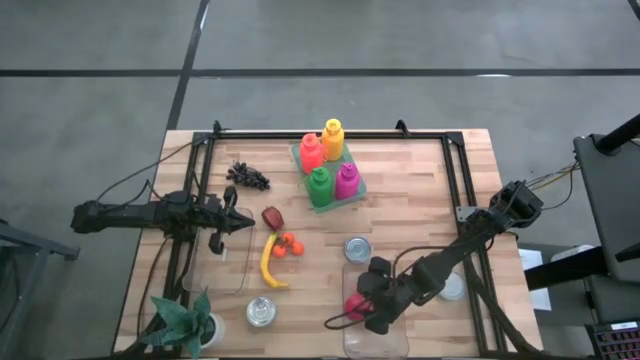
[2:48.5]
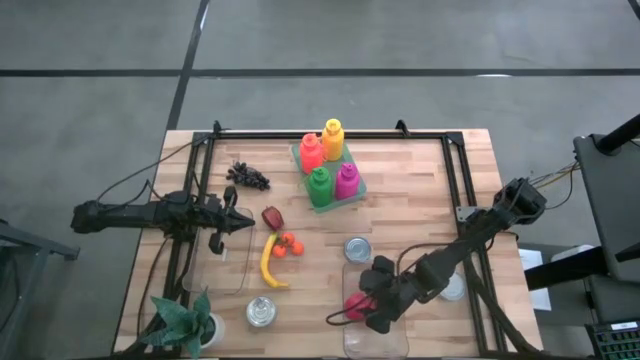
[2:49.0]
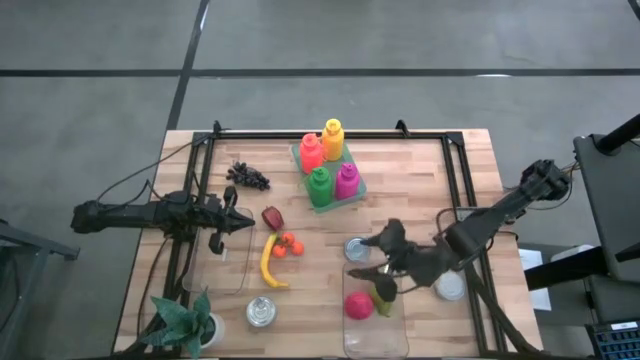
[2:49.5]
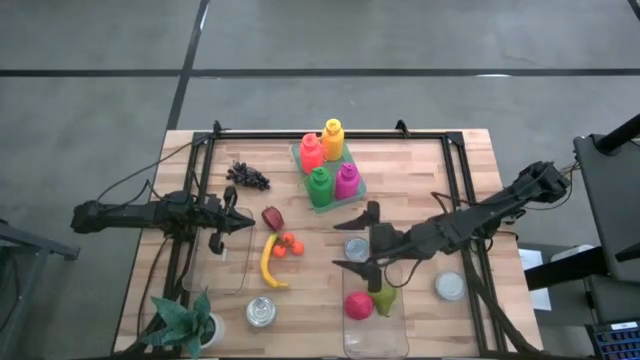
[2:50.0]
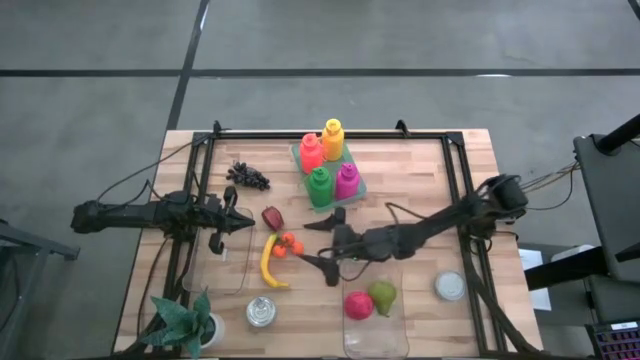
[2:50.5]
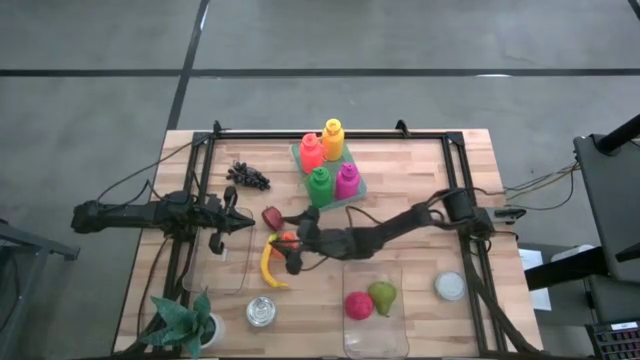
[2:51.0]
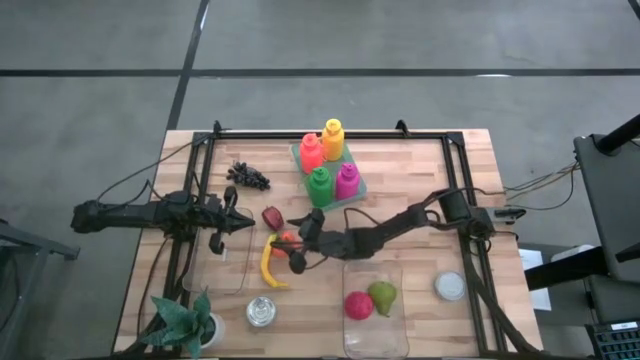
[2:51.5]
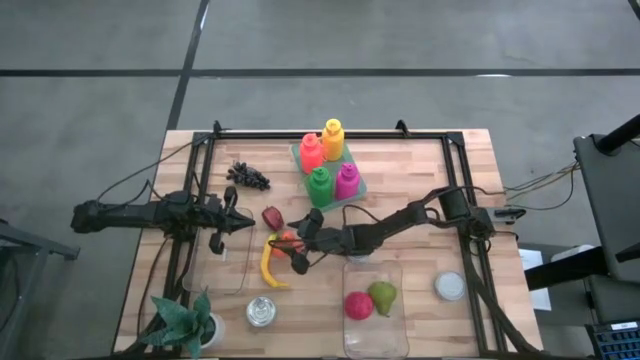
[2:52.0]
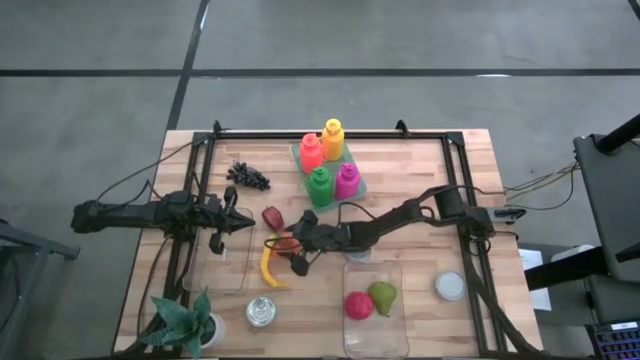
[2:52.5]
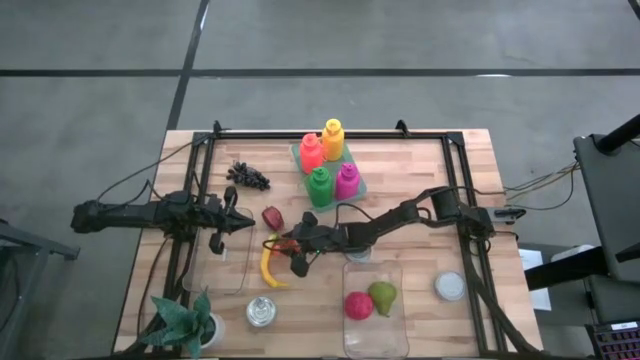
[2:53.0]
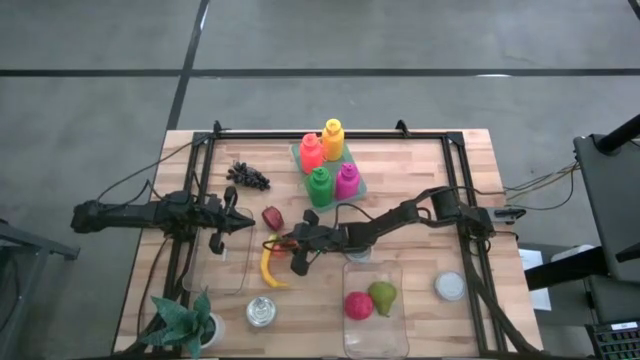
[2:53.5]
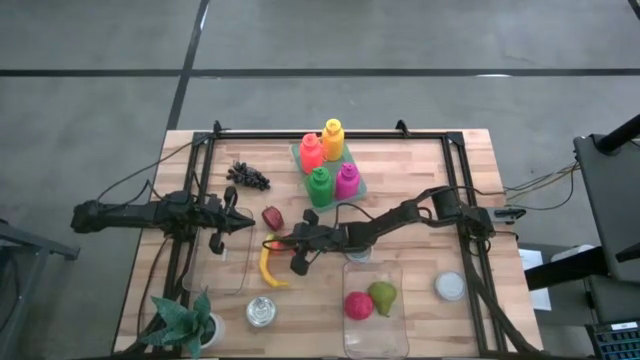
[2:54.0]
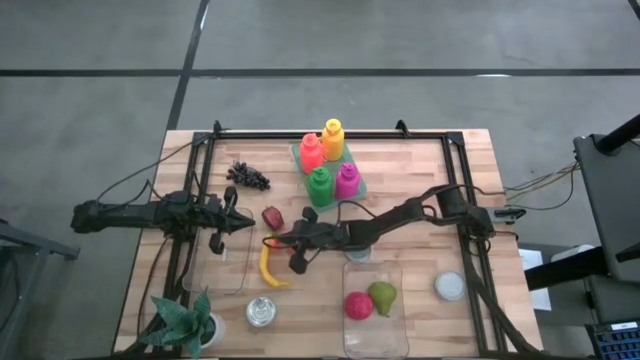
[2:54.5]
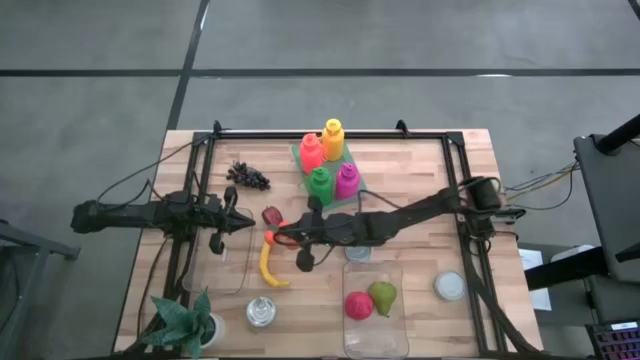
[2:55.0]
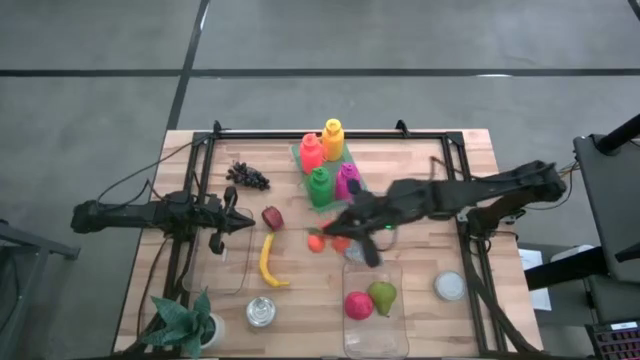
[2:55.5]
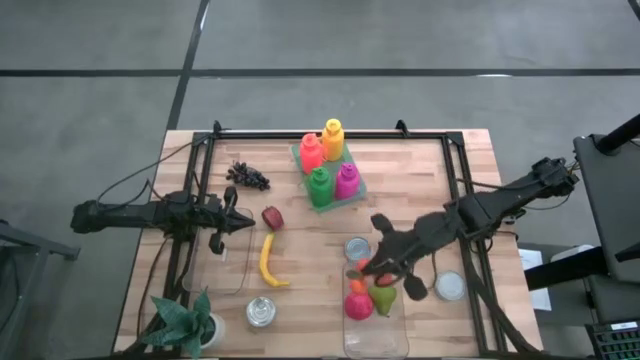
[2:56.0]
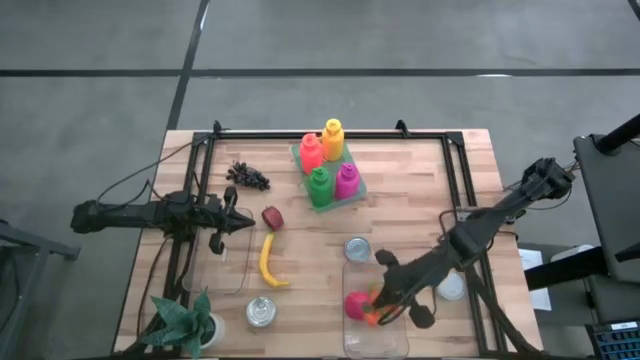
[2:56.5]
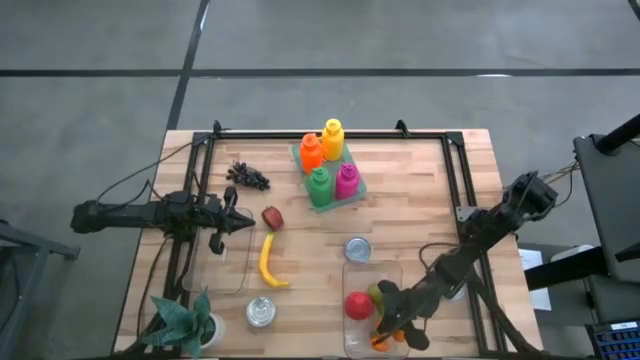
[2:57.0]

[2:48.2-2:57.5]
Task: Pick & Place Food Item
Put the tangerines into the bottom transparent bin

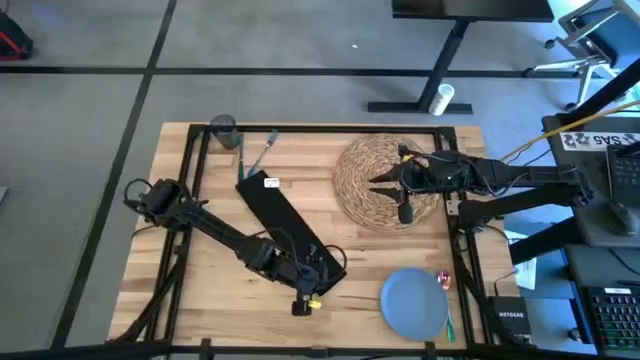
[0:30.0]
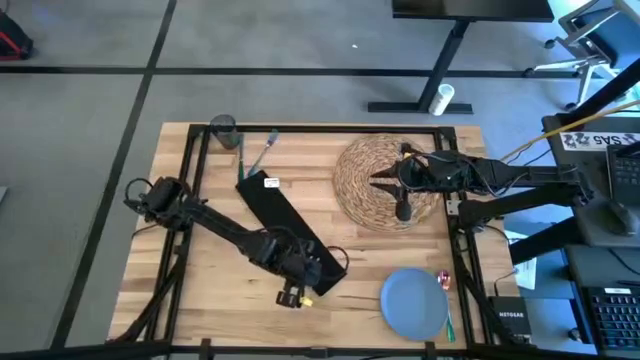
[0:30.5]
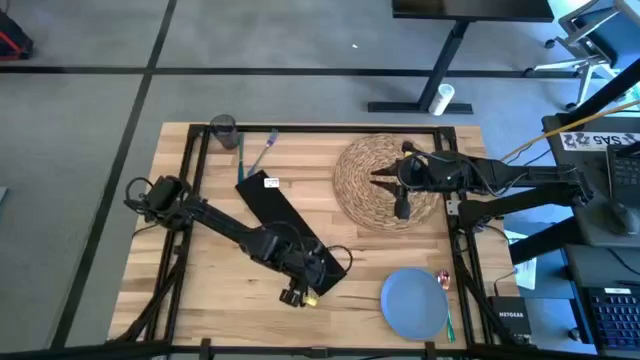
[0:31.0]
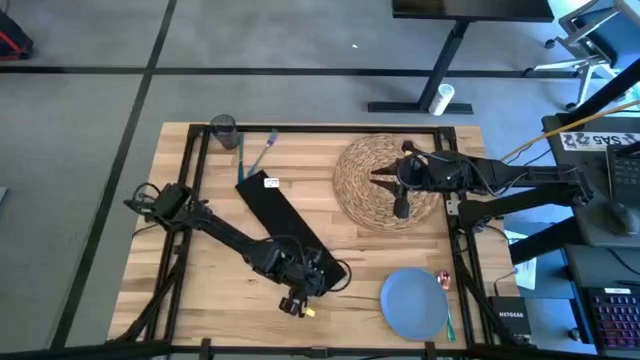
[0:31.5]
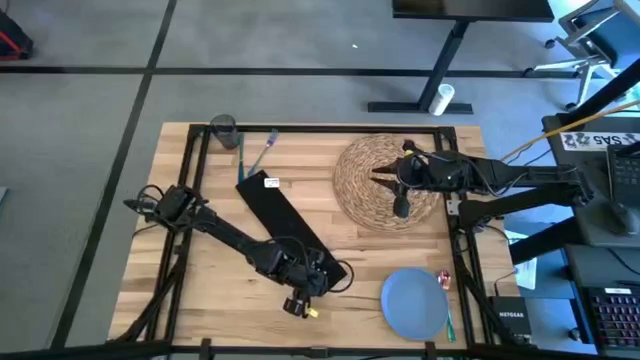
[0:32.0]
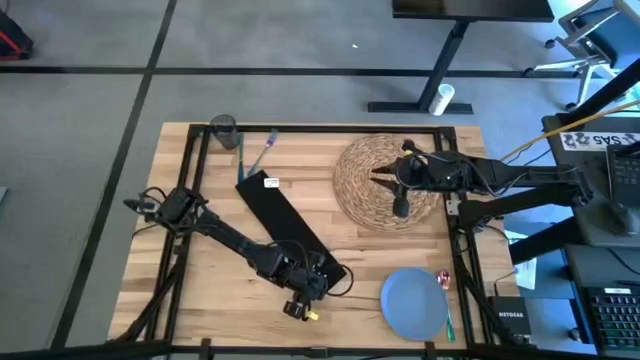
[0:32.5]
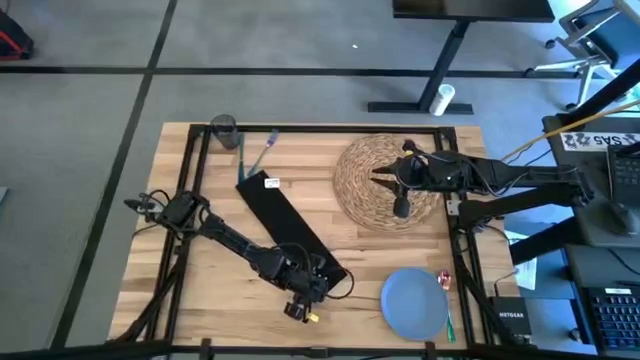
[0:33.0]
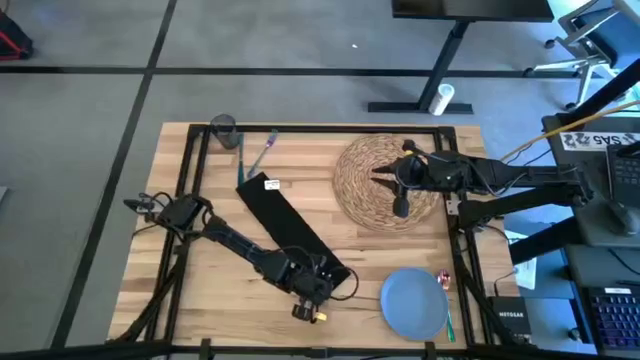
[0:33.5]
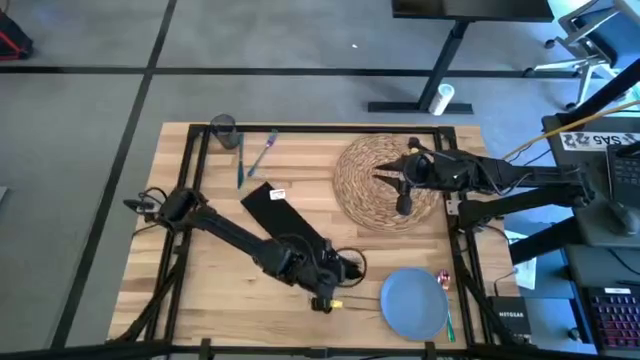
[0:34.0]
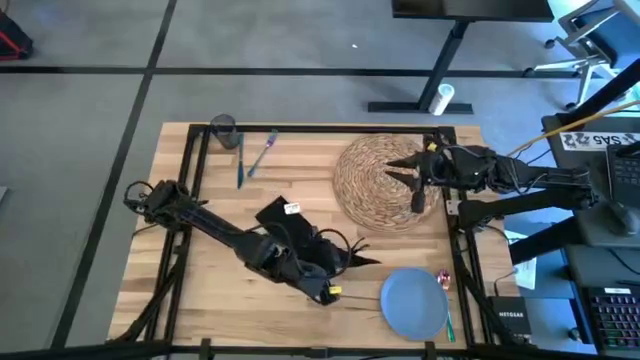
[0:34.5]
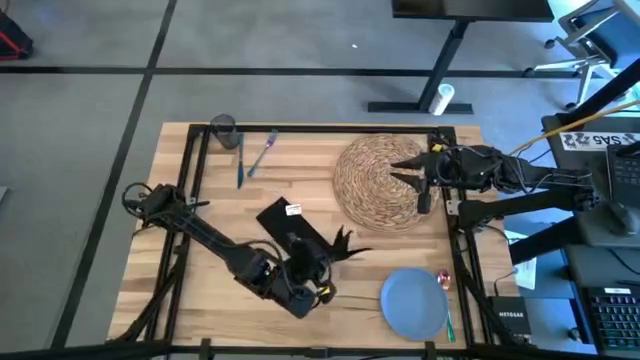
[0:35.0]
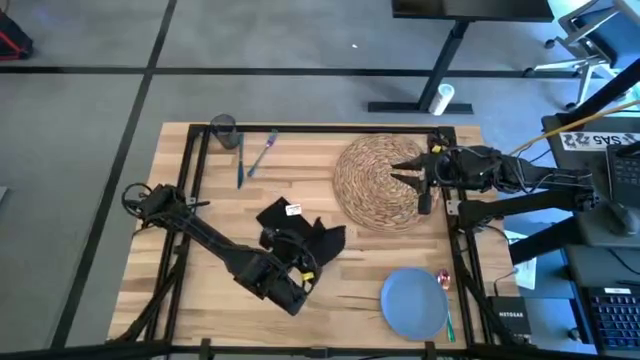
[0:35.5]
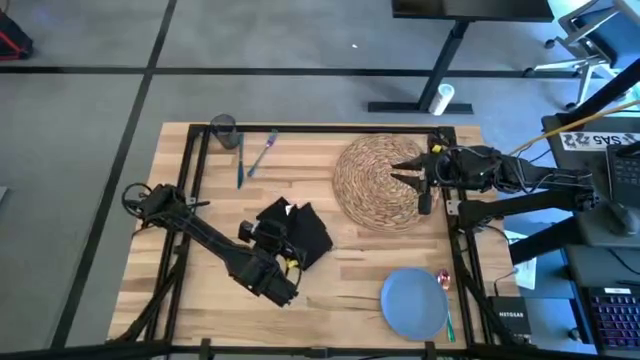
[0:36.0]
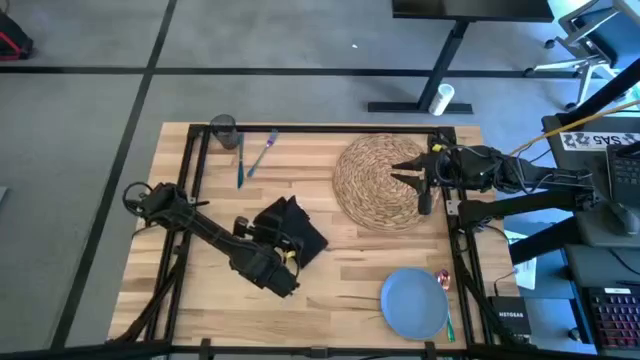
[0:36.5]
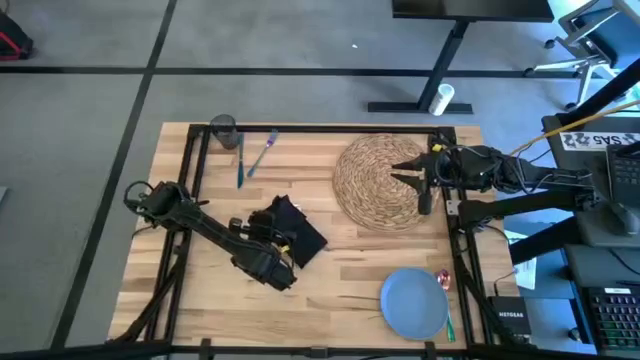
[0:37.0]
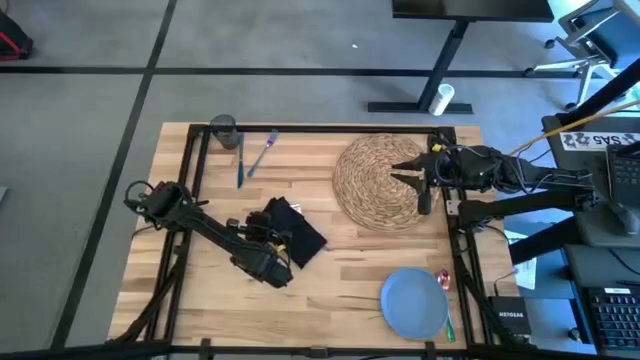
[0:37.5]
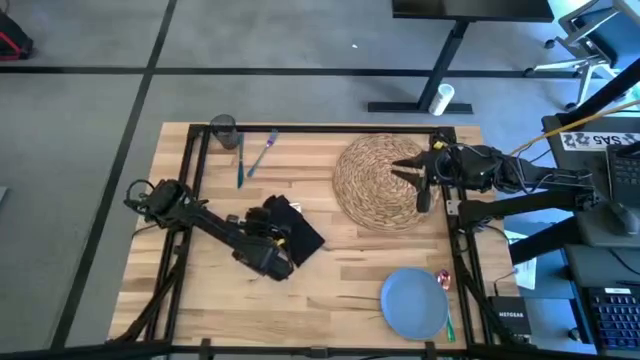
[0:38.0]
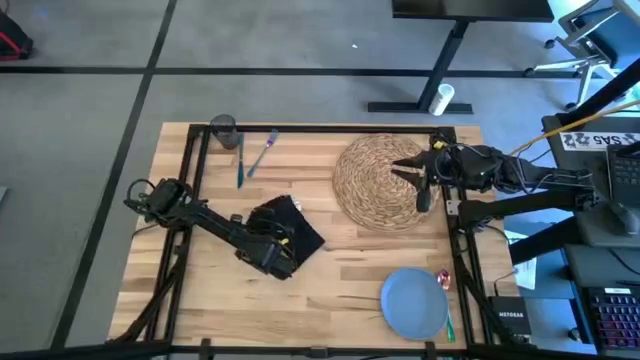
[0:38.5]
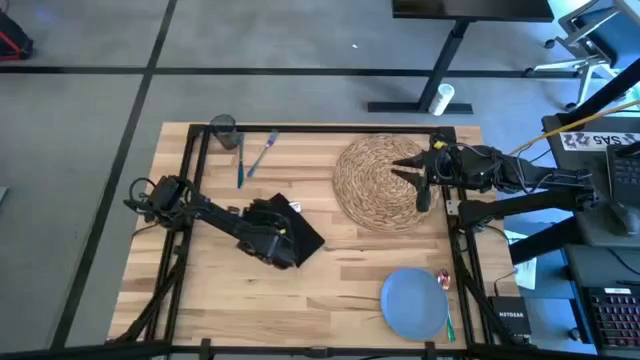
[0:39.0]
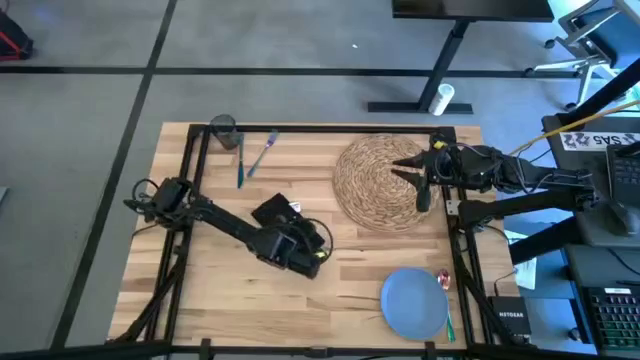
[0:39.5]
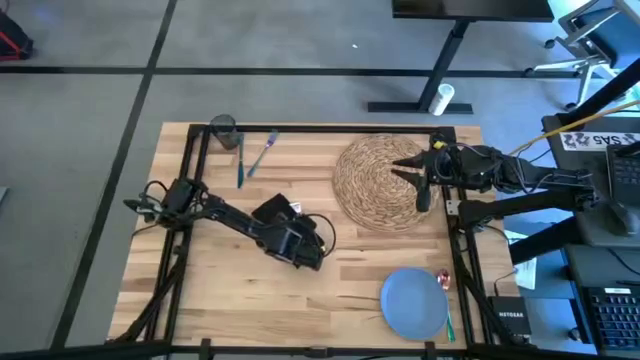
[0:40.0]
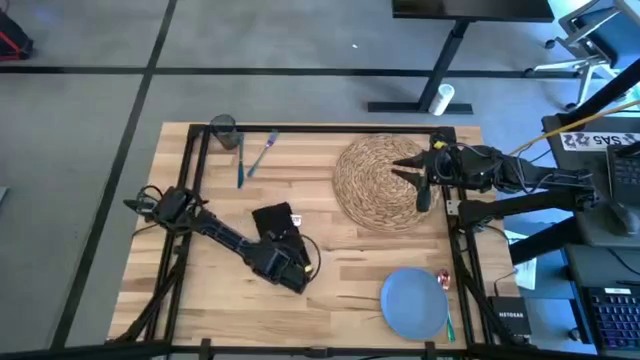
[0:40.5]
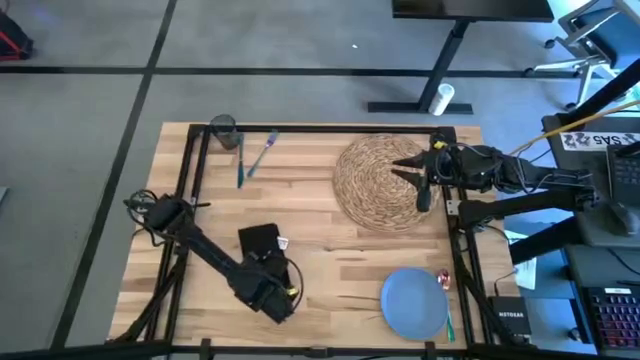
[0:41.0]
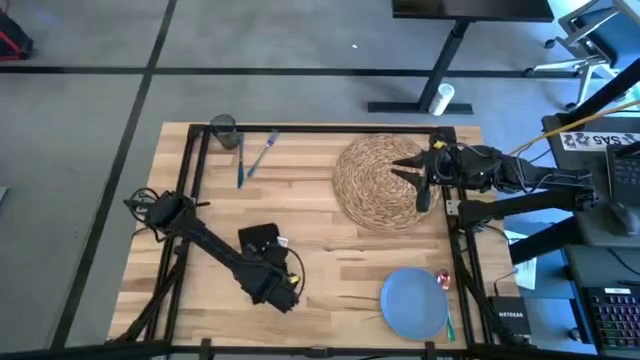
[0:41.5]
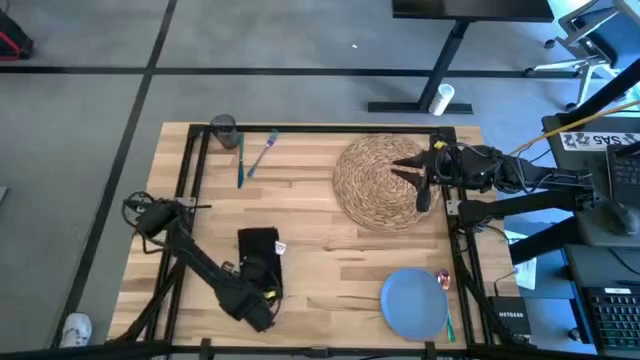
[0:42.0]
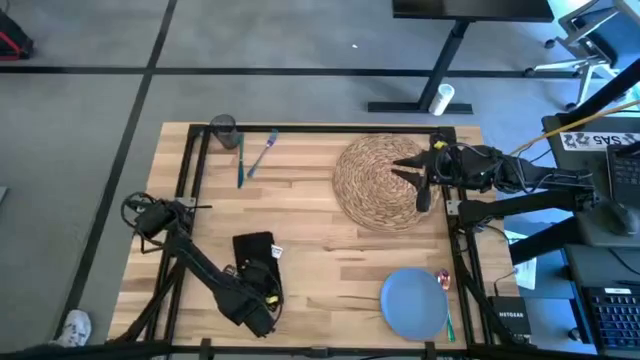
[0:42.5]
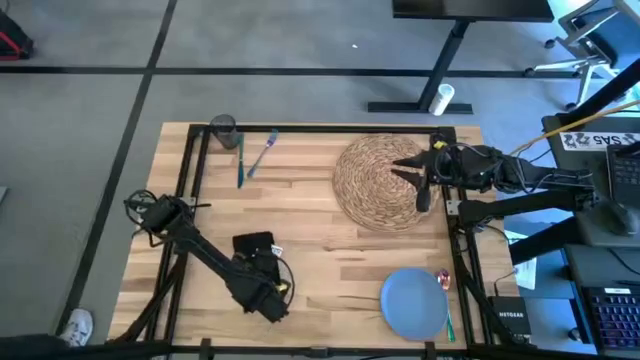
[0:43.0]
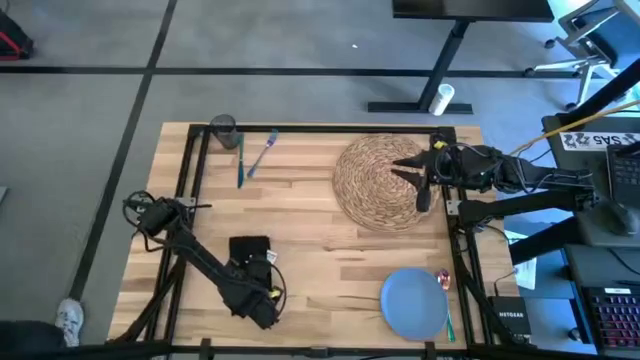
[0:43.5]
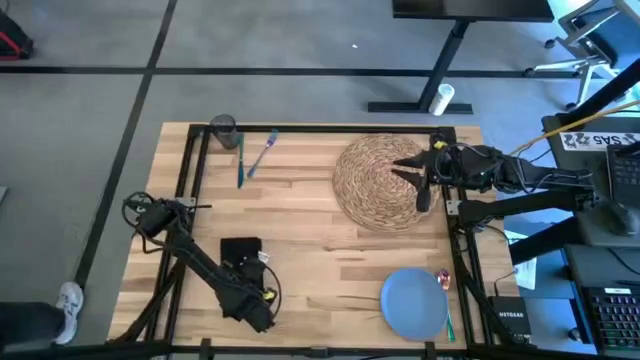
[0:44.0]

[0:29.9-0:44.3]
Task: Set table place
Fold the black table napkin
